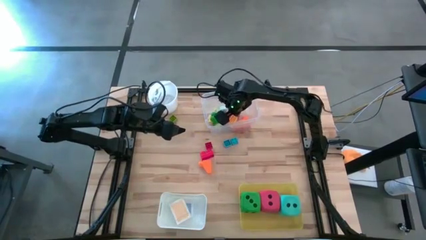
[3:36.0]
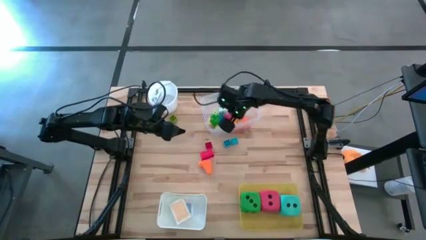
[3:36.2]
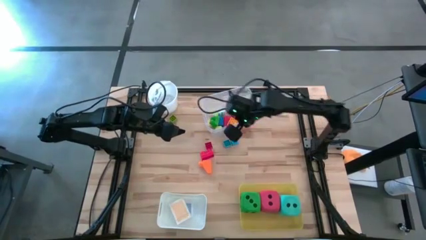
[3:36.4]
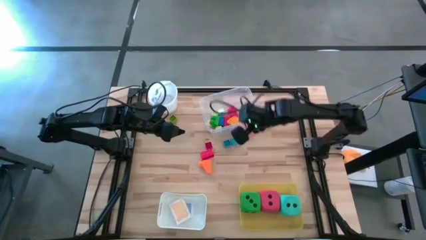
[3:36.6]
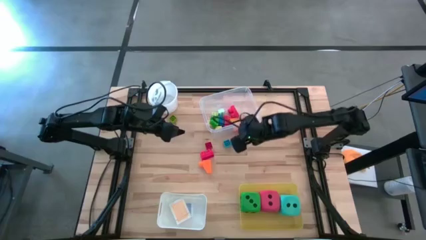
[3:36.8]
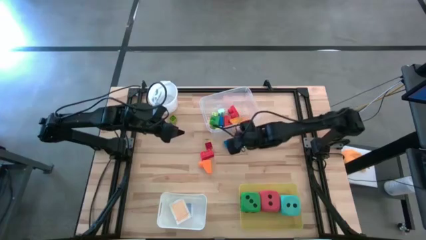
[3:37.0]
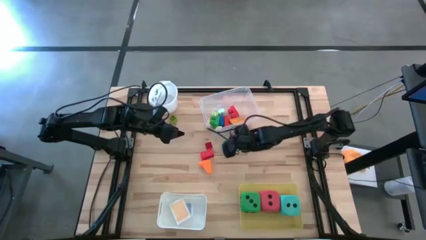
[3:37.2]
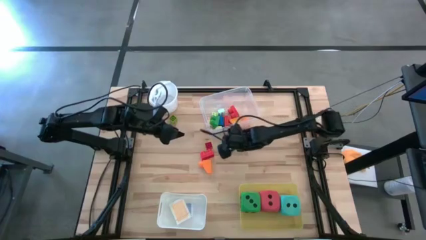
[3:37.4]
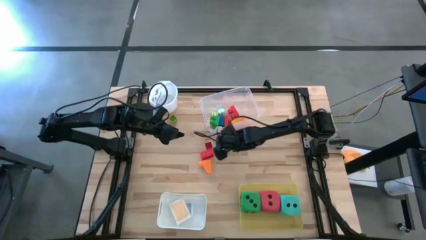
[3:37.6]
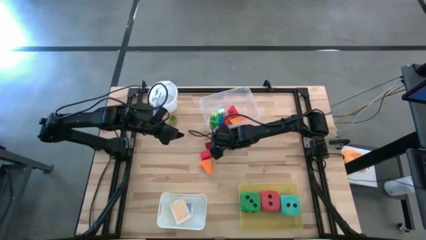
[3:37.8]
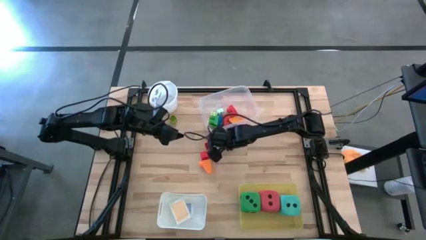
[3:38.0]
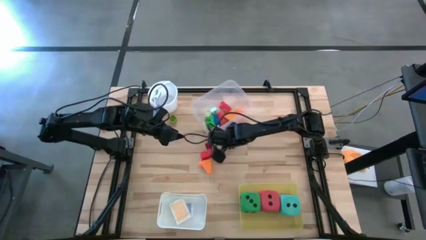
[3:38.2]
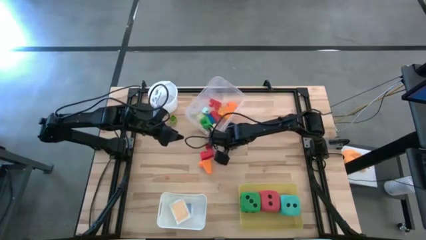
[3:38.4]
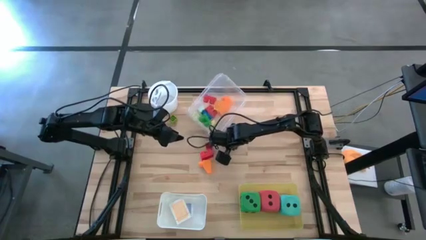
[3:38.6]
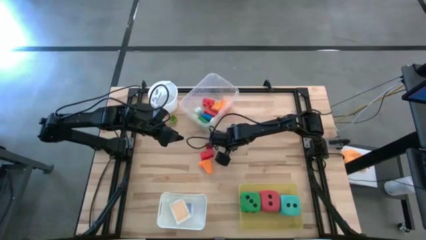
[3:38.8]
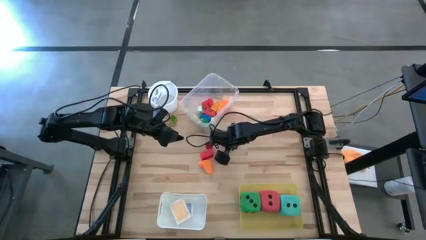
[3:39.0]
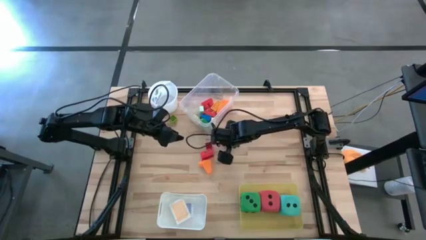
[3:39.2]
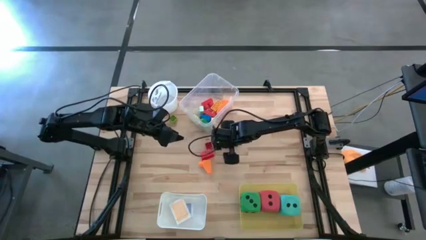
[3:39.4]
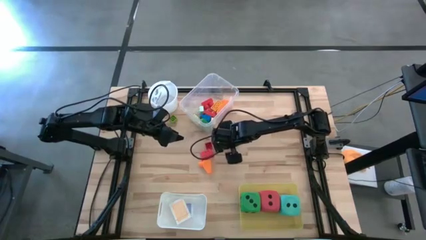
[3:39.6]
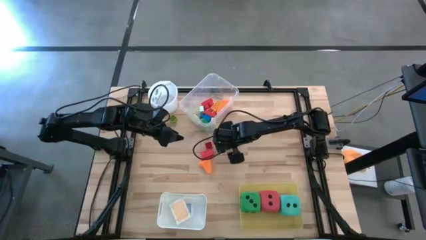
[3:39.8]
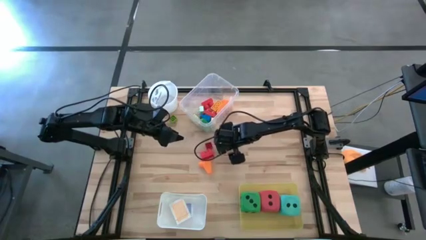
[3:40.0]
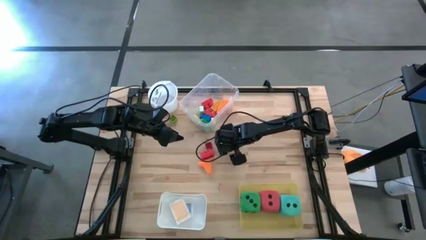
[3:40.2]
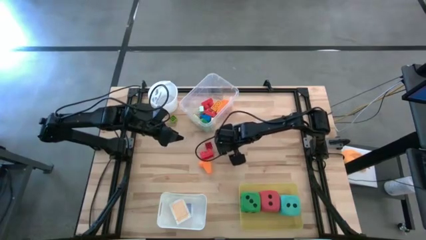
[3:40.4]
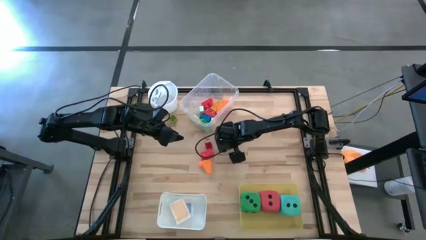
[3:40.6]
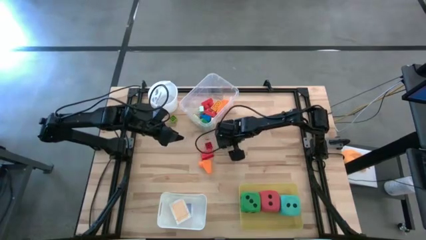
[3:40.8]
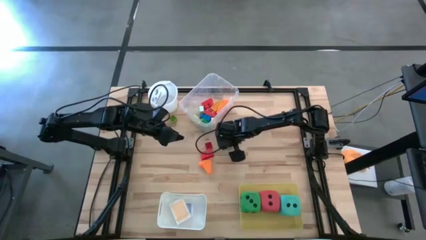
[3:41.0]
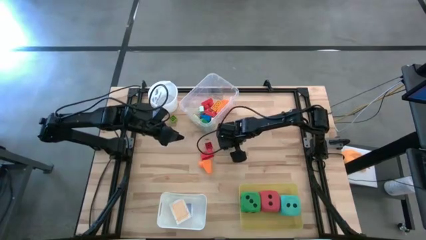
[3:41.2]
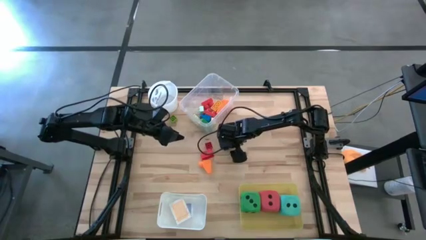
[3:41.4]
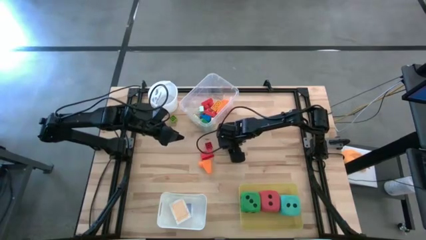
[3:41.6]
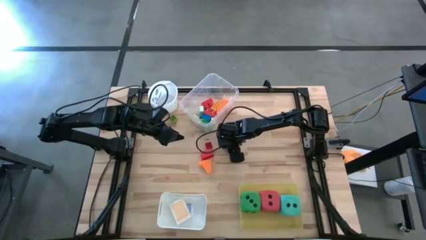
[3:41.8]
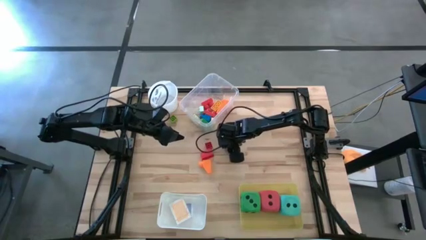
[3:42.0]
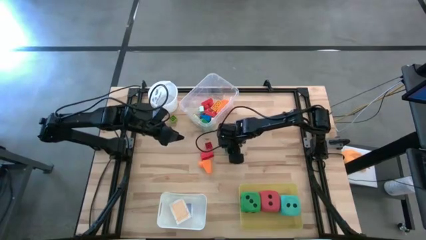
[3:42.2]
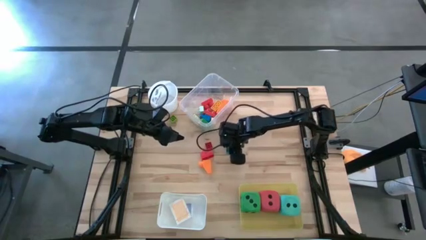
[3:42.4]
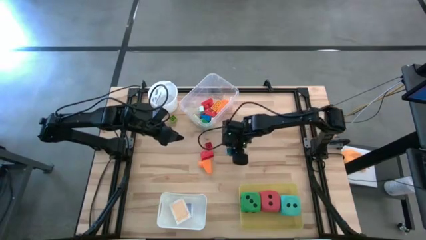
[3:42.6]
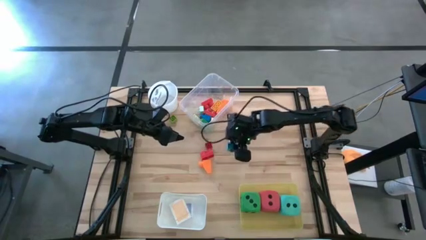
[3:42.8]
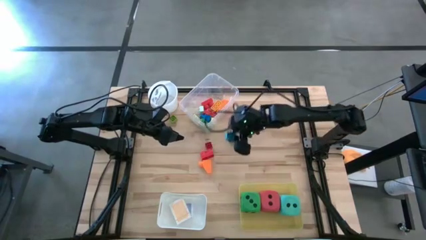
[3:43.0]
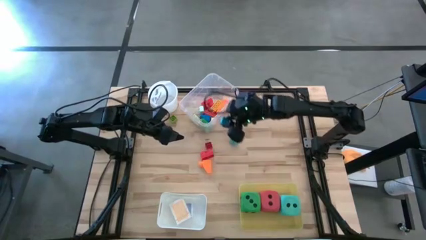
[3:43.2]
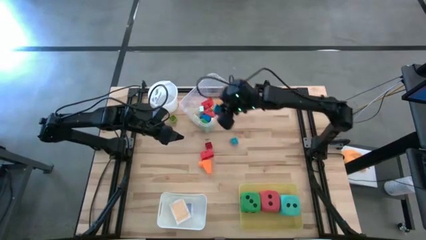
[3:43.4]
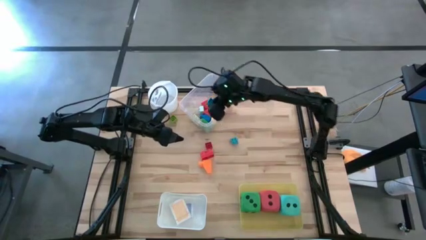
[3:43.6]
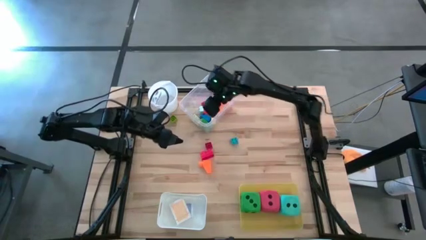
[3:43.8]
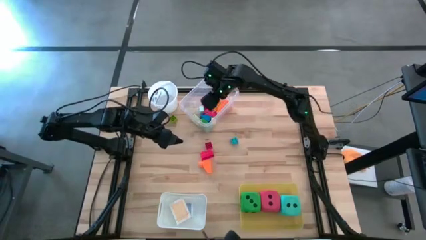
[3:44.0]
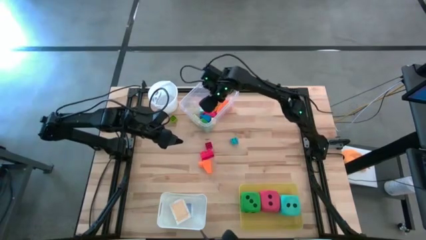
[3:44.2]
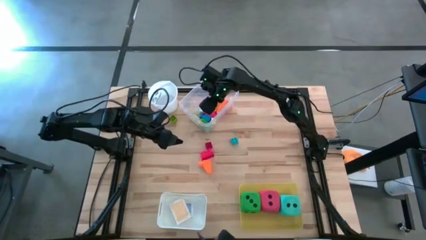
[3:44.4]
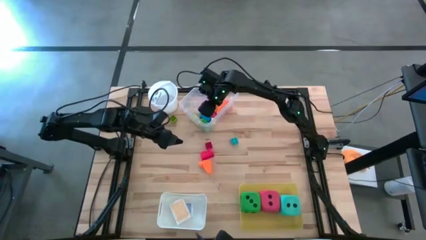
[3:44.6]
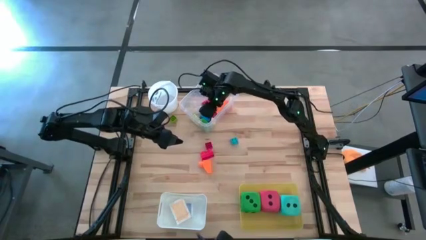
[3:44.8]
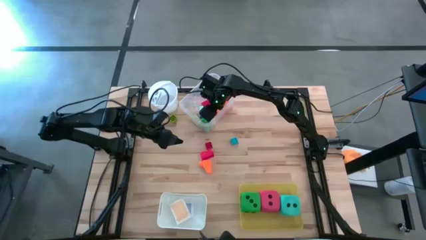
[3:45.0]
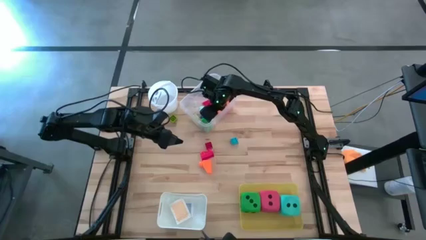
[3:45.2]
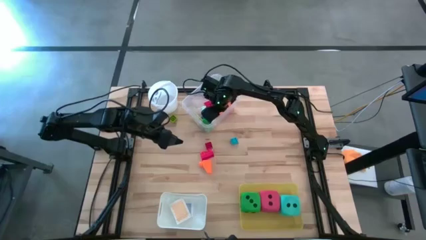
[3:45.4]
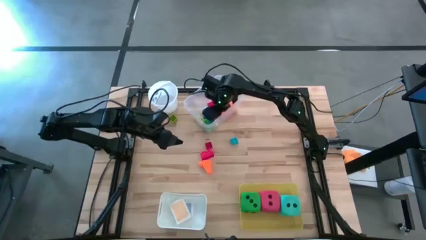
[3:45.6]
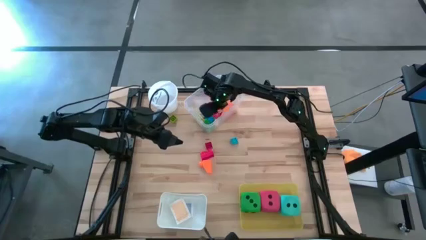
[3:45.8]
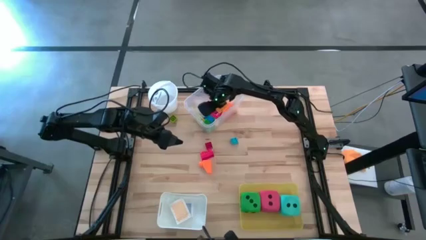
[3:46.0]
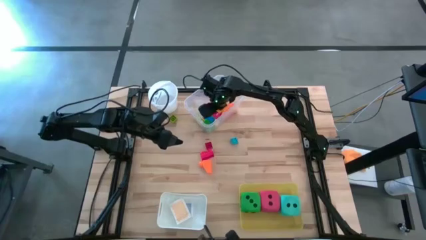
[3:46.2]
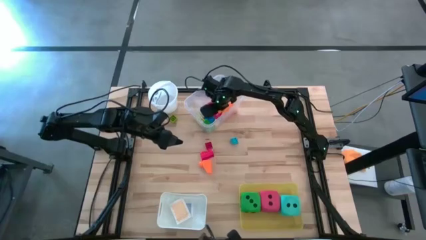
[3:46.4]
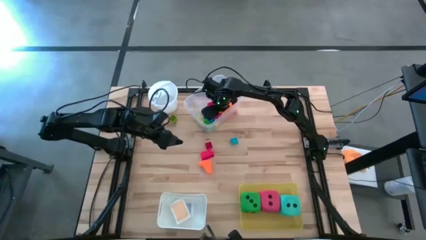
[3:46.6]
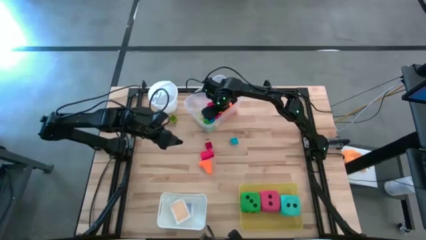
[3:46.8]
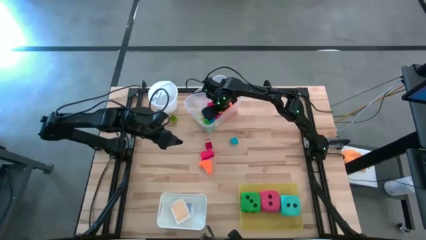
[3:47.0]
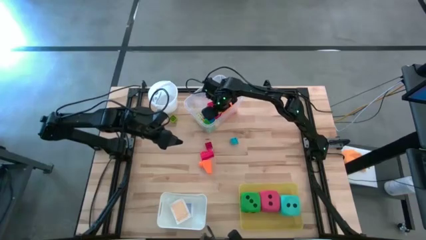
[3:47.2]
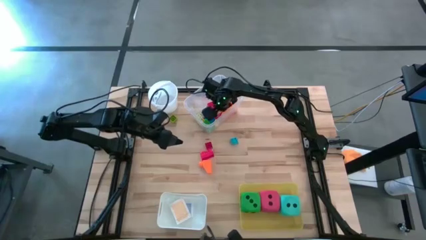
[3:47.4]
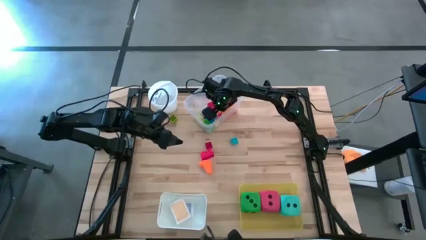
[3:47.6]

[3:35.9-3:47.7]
Task: Pick & Place Toys
Put the blue game piece into the transparent bin

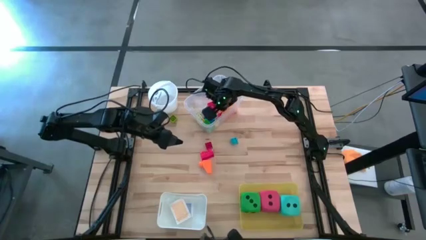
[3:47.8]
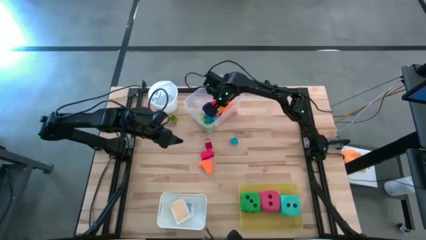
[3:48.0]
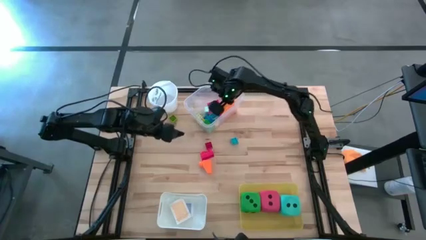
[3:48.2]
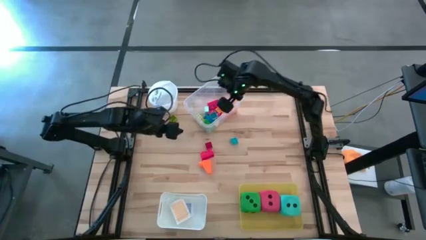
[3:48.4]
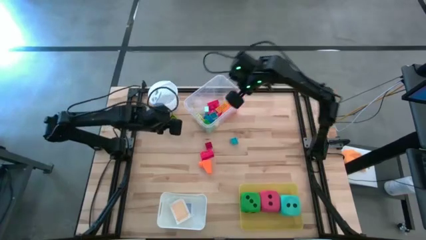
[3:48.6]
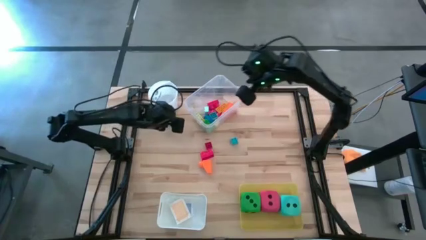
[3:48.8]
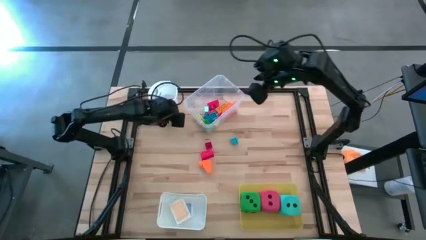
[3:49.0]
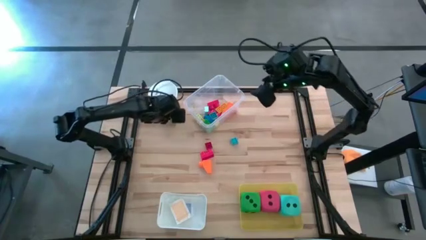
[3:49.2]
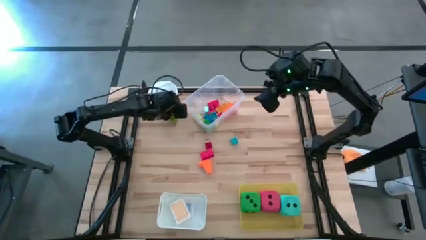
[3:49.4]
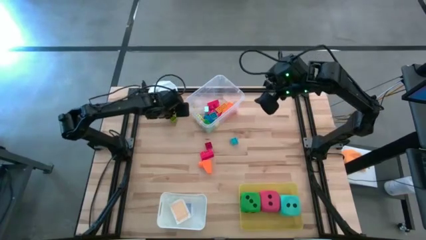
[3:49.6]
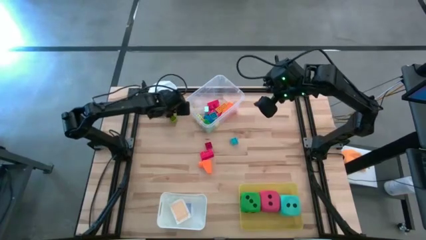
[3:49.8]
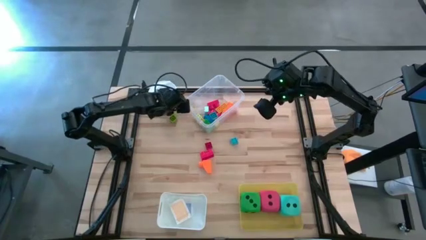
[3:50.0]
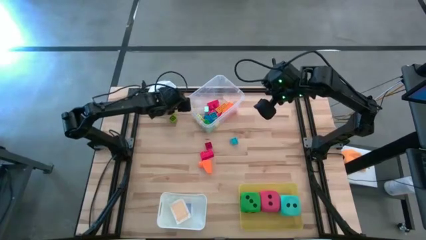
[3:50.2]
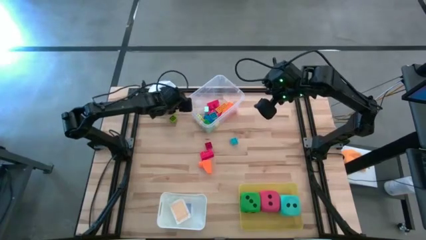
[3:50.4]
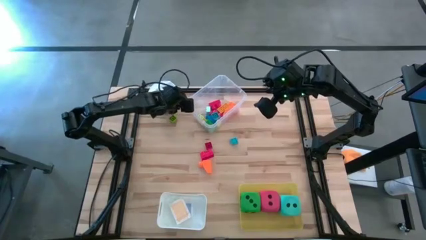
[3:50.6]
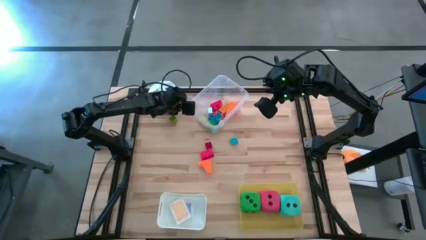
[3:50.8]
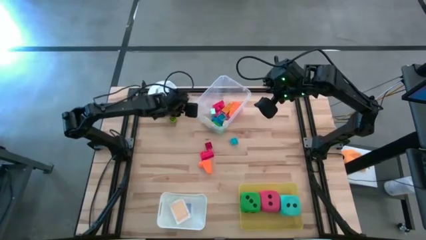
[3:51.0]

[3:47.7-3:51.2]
Adjust the transparent bin on the table

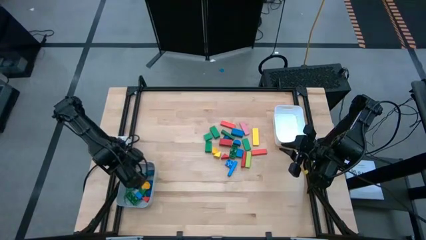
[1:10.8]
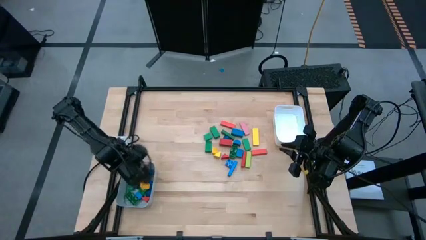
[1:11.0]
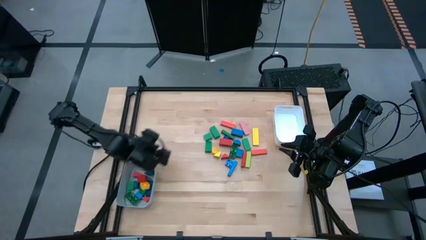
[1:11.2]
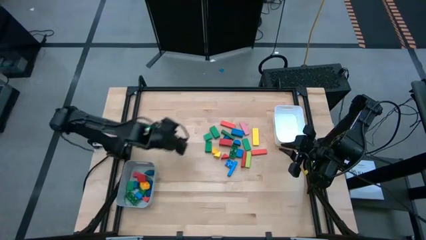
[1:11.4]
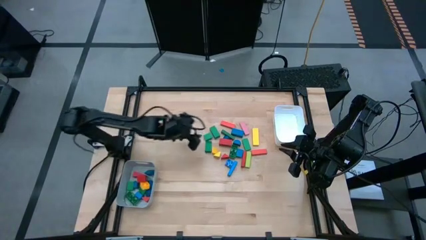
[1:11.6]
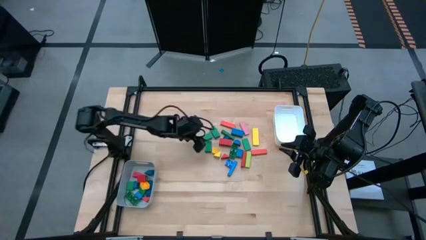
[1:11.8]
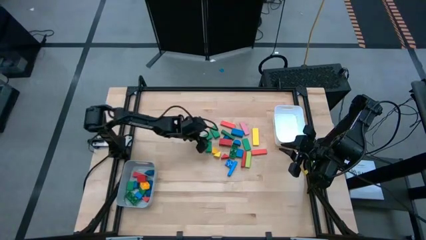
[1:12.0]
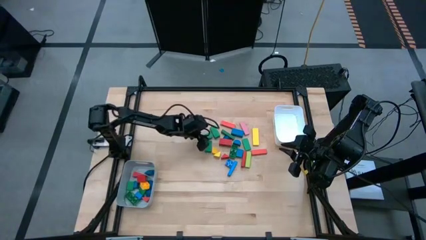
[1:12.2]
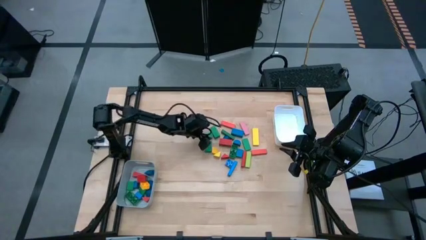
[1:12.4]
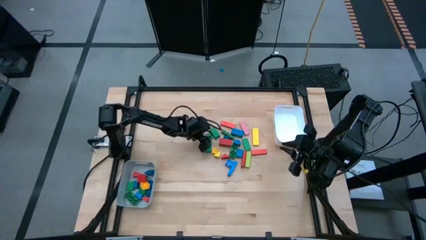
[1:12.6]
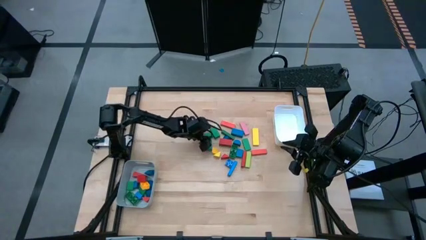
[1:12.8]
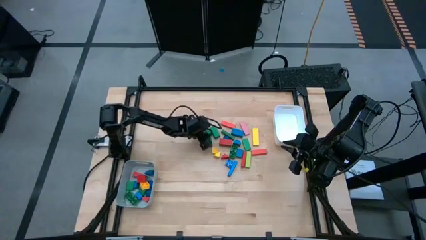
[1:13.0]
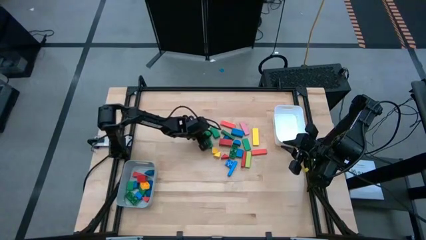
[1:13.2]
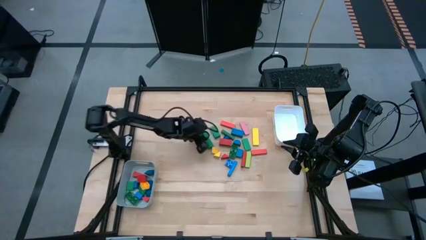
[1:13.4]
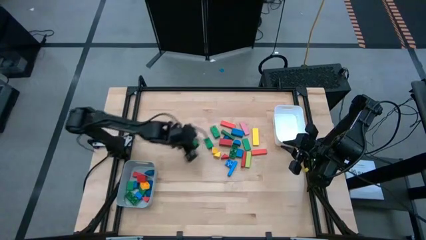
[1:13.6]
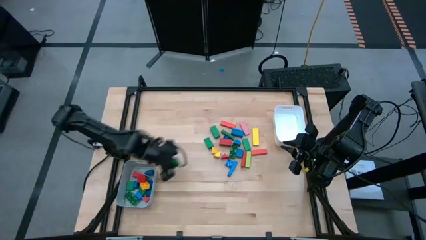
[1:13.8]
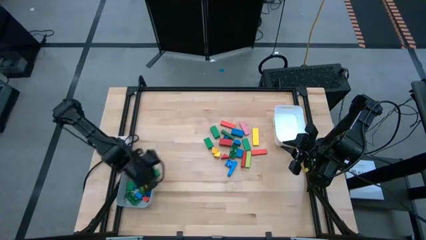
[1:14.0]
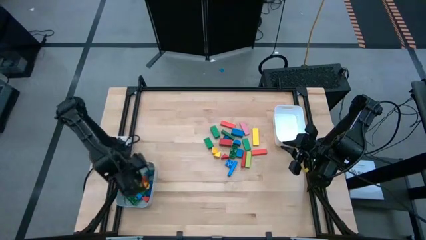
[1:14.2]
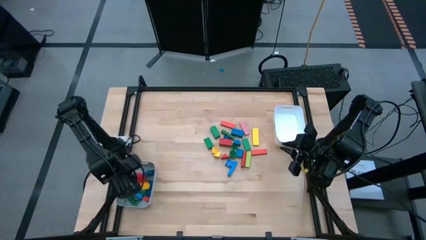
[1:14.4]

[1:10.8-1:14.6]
Task: Sort blocks by size
Put the green triangle block into the gray bin
